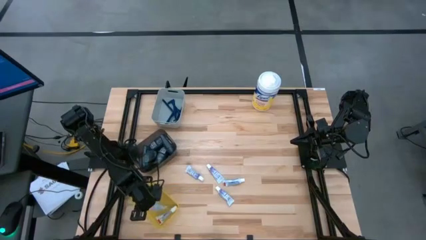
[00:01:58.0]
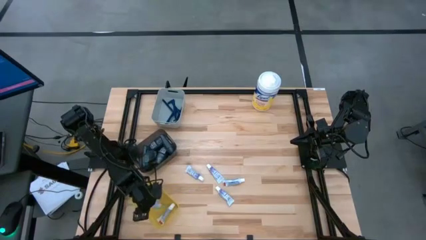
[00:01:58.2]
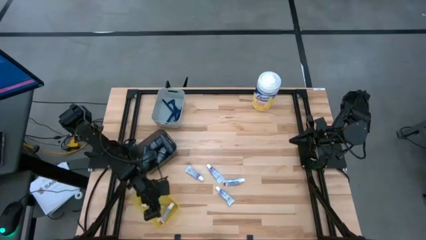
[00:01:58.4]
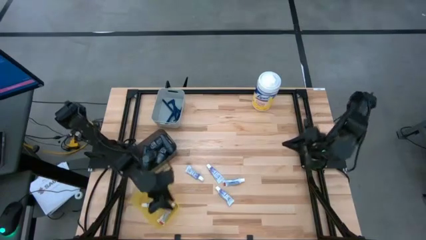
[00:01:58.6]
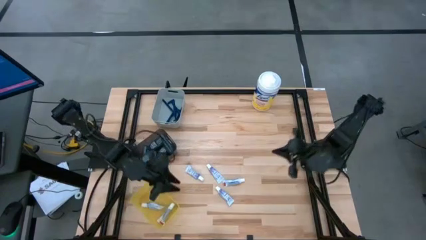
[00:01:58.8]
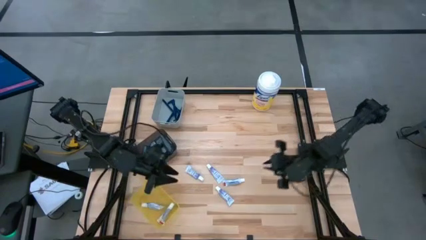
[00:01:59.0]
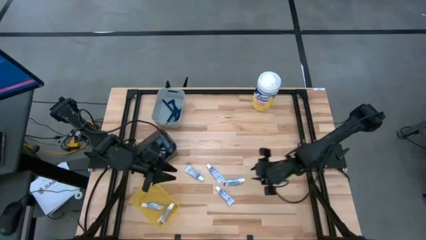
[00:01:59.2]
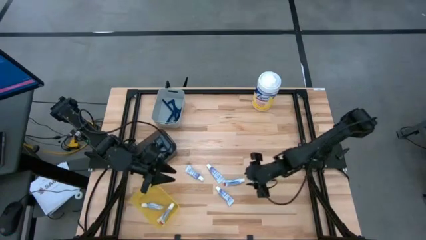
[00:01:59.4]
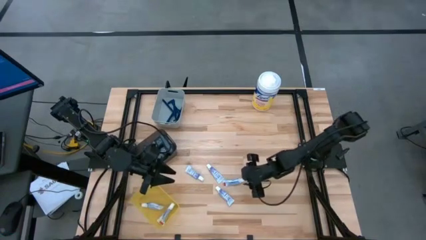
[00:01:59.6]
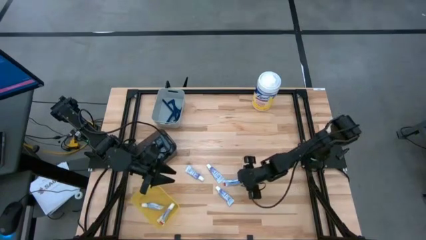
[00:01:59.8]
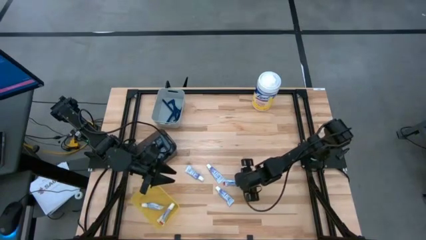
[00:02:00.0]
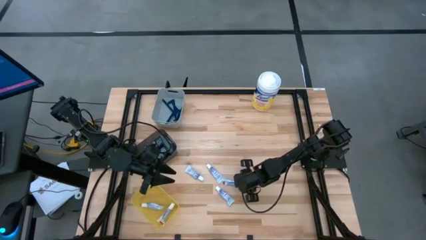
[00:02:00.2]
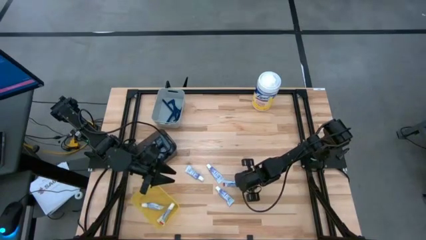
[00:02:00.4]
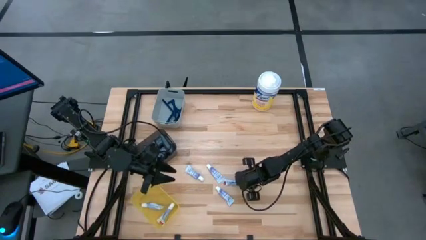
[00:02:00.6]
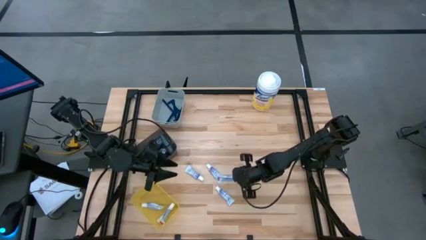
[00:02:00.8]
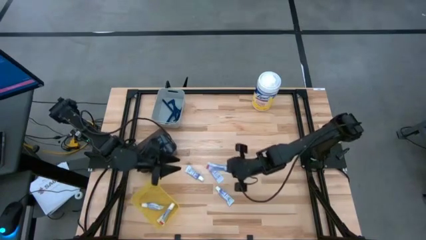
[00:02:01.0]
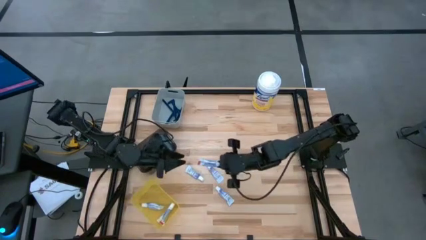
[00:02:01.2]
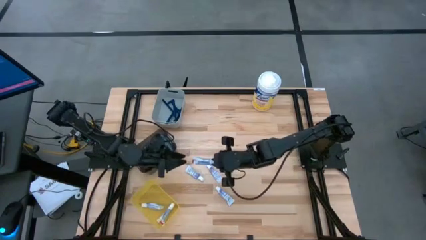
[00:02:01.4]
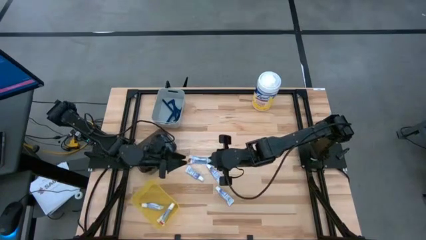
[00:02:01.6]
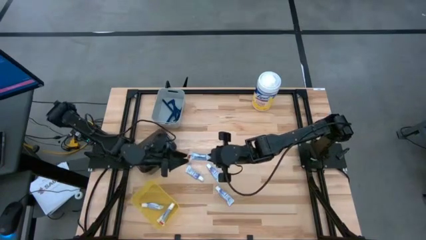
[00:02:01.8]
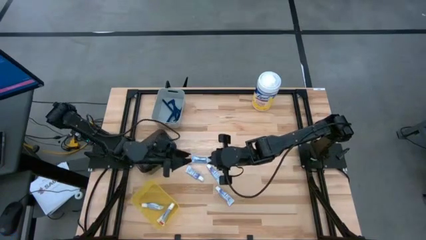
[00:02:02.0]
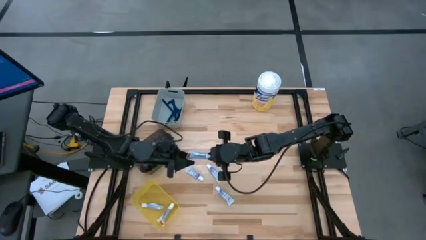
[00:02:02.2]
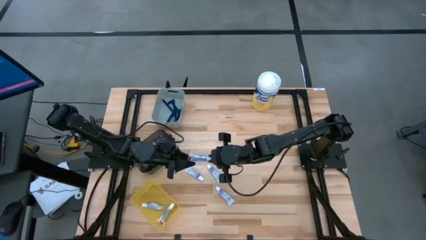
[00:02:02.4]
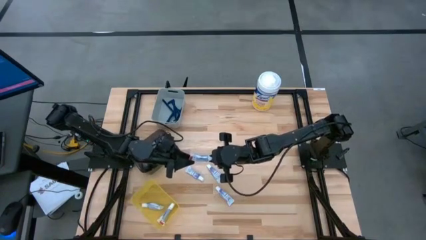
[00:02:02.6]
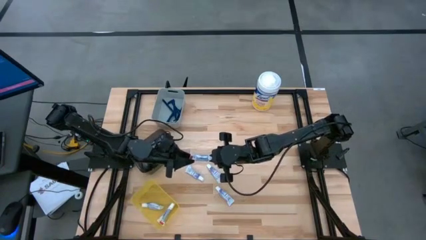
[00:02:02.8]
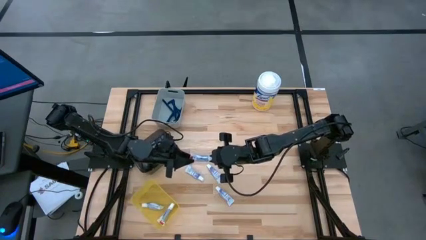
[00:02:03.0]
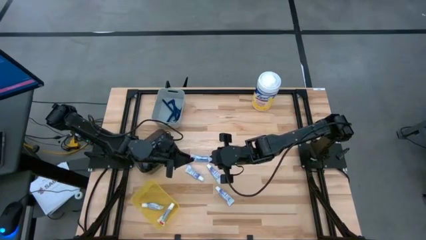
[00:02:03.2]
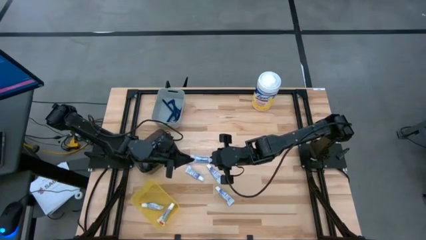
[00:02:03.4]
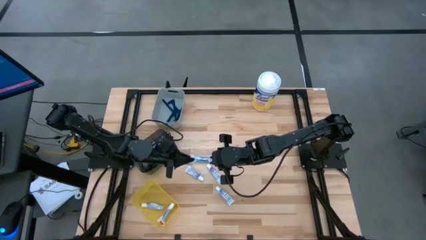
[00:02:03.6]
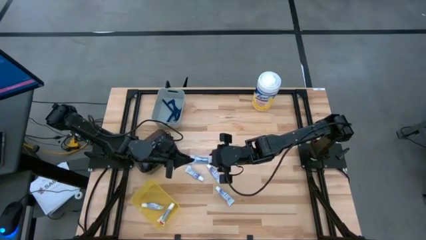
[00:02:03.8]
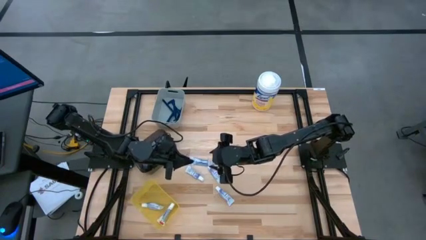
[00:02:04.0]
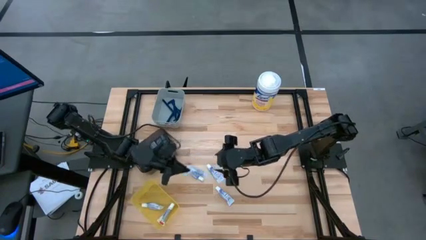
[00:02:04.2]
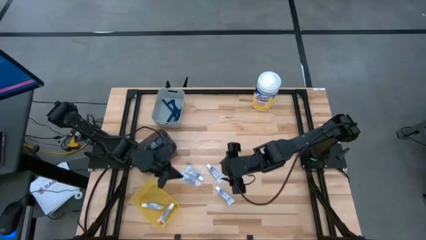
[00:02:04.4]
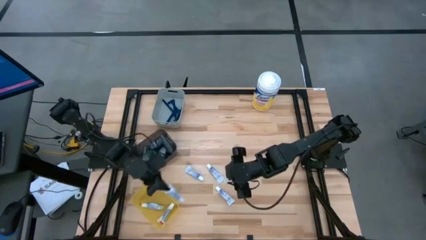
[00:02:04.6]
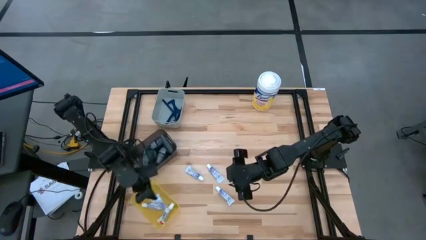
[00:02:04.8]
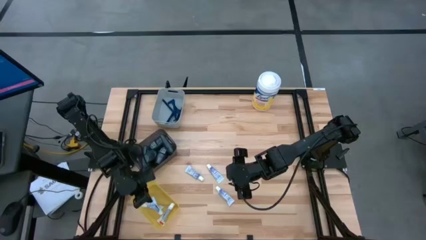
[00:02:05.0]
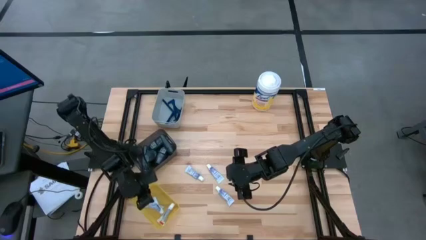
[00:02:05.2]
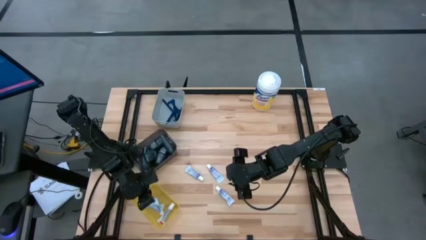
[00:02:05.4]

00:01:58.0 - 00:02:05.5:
Task: Pick & Place Travel size toiletries
Put the toothpaste into the yellow bin

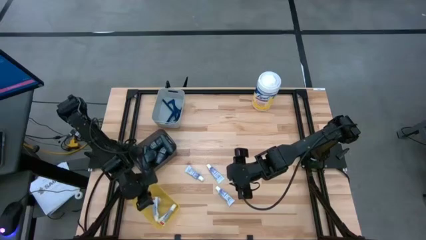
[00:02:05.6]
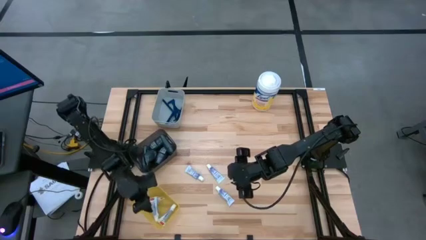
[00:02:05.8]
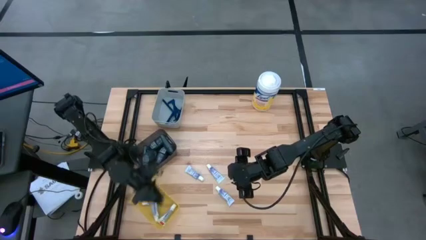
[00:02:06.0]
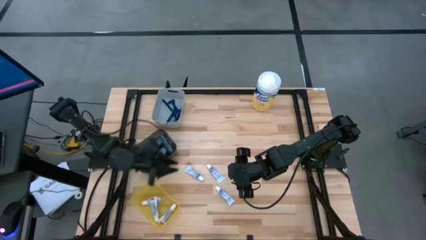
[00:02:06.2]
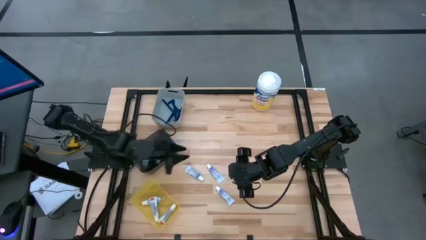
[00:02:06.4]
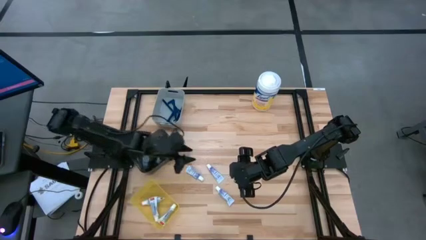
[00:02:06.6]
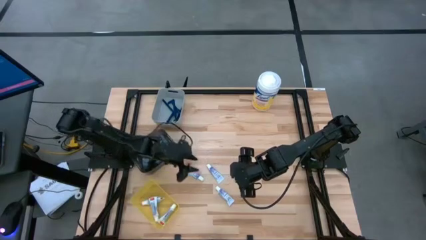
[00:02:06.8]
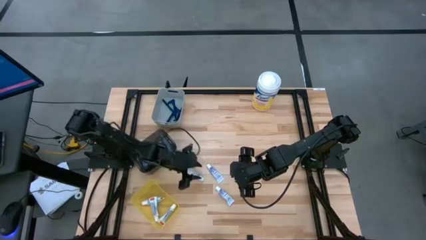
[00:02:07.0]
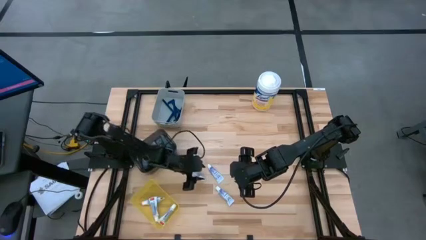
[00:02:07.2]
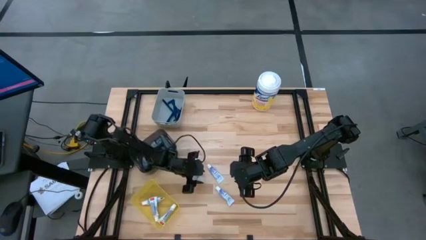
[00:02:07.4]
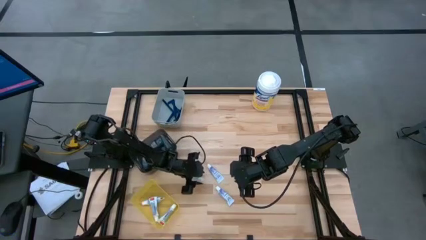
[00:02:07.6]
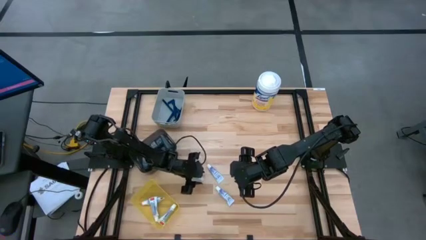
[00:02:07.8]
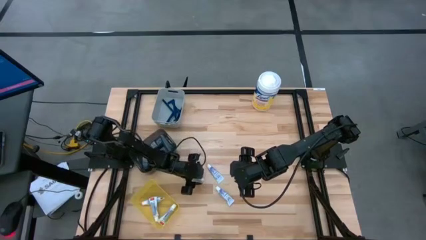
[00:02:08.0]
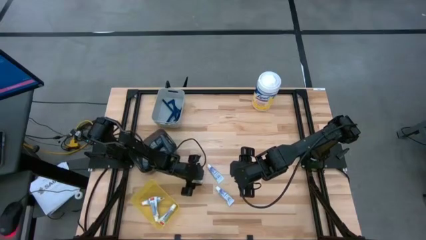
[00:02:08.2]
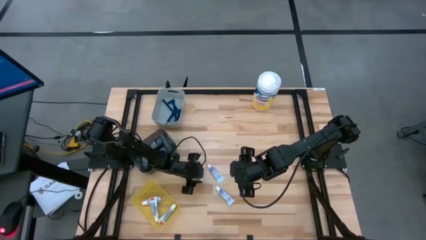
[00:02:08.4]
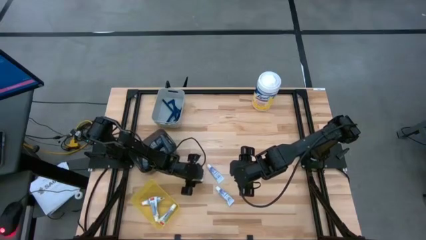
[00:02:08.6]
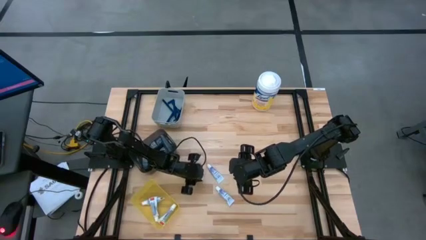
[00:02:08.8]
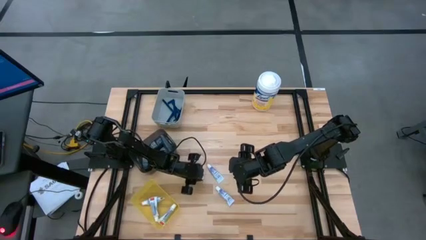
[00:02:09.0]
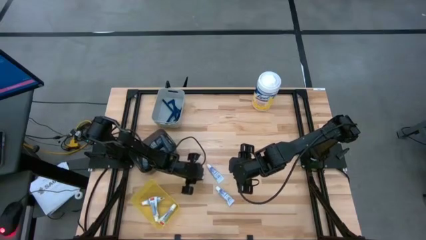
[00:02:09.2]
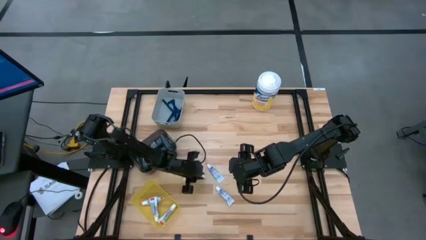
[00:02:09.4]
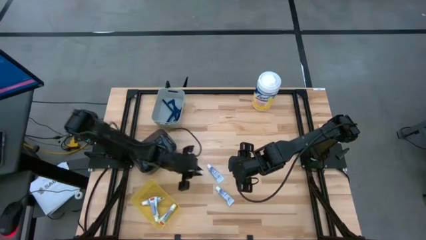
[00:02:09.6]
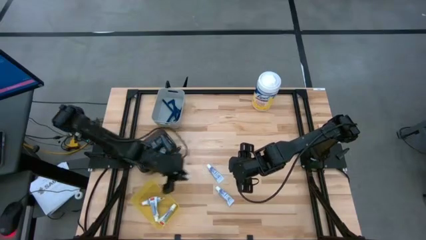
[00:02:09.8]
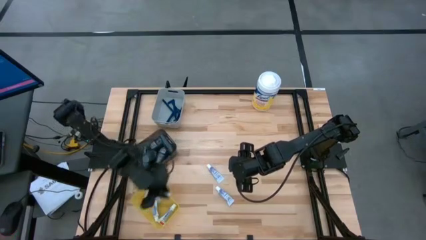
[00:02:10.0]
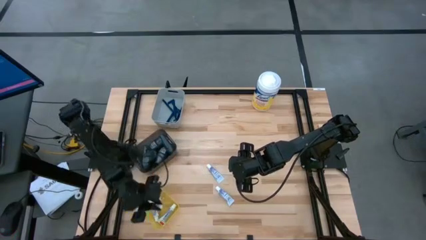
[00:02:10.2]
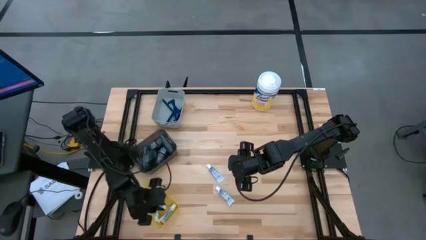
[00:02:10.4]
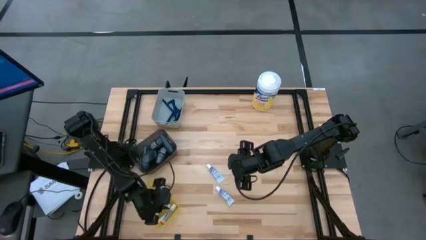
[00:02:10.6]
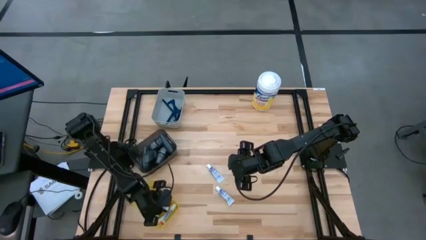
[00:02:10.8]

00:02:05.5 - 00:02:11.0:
Put the toothpaste into the yellow bin

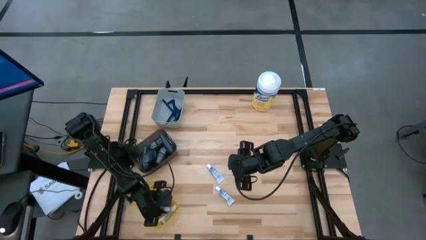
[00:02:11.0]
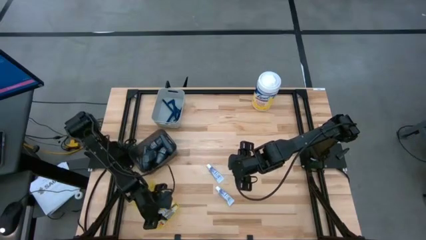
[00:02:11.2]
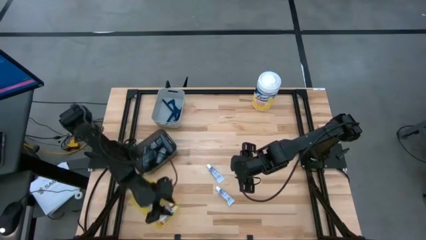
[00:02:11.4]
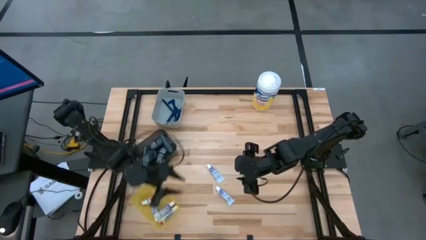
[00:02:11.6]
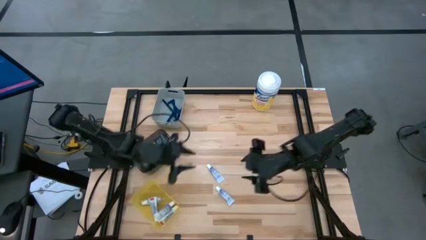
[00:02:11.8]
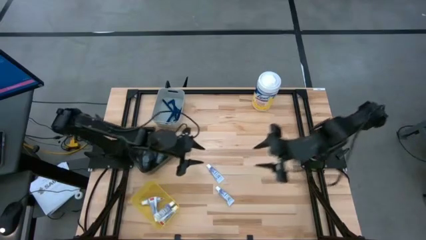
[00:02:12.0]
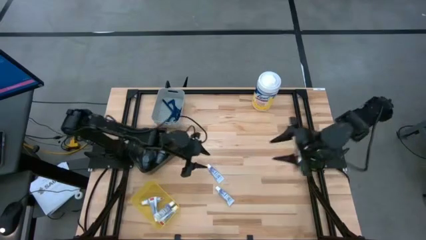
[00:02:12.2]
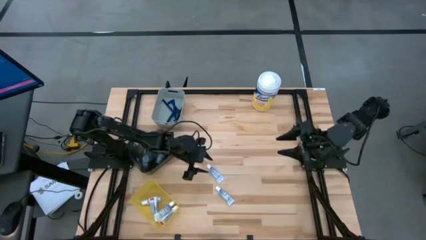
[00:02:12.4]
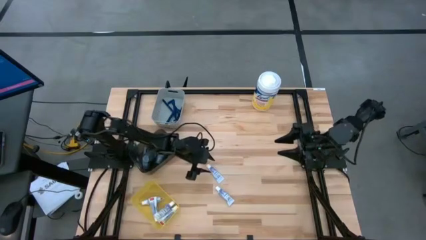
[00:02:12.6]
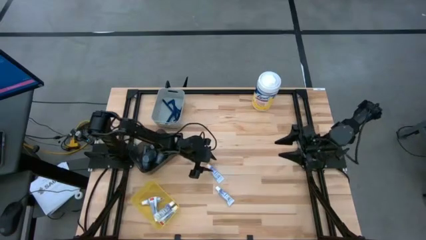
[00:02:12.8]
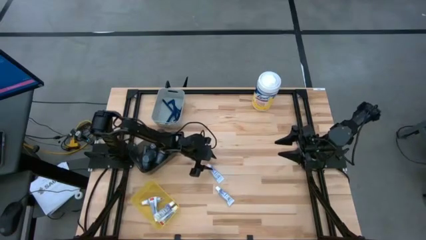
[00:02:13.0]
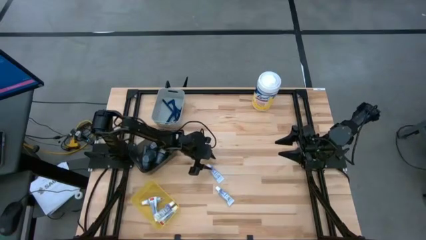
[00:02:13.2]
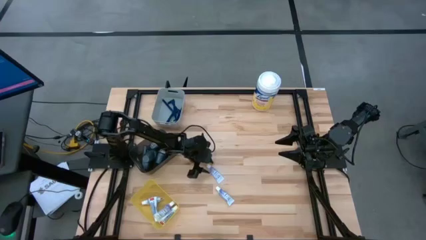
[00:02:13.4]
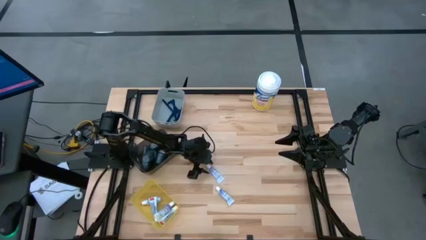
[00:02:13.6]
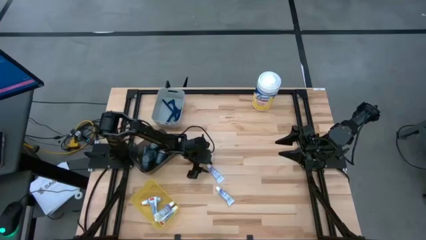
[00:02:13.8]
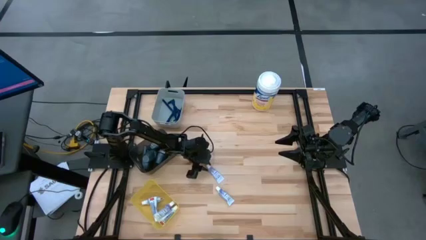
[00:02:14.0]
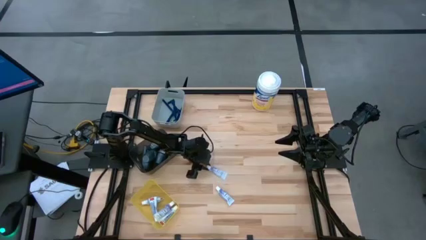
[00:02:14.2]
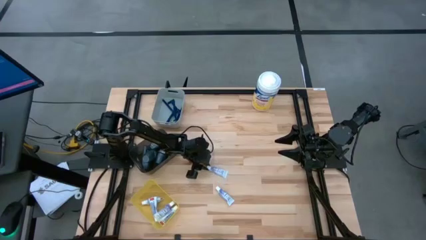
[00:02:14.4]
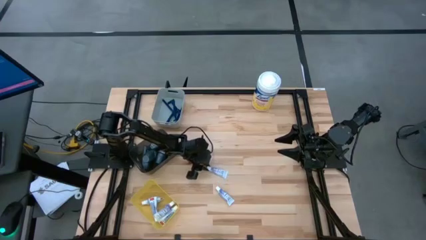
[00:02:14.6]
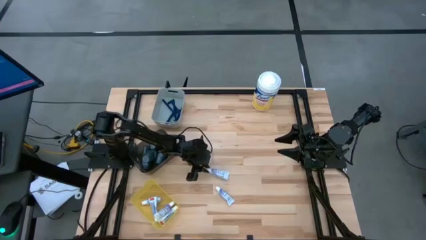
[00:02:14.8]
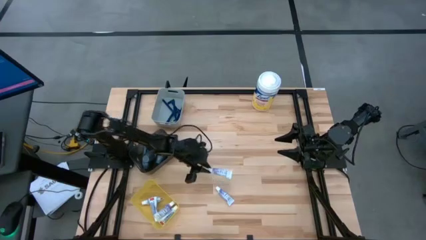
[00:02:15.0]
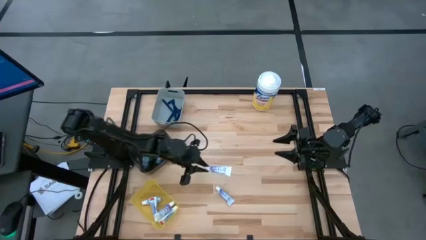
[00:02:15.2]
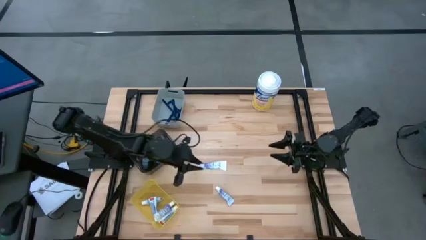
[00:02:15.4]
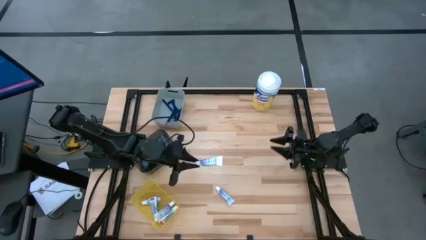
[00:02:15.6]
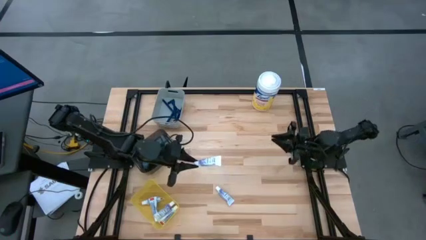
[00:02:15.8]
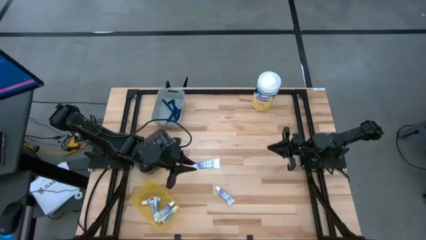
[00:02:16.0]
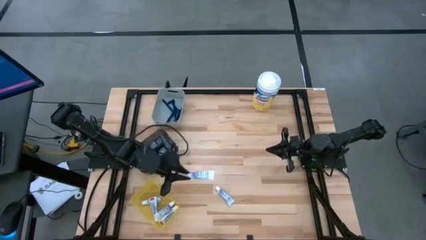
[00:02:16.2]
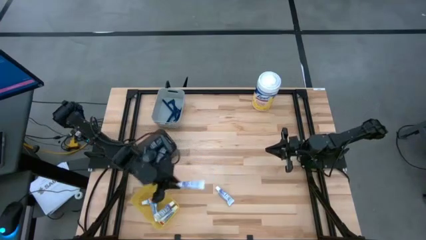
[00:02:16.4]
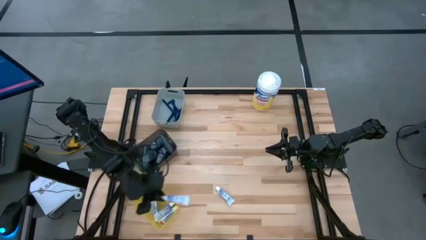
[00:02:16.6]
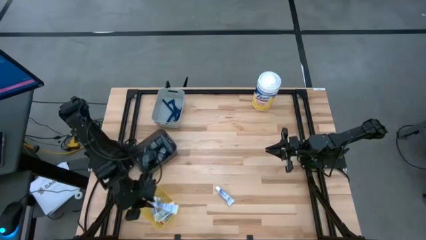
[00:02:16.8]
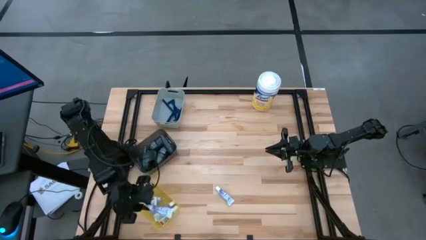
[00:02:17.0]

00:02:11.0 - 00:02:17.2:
Put the toothpaste into the yellow bin
